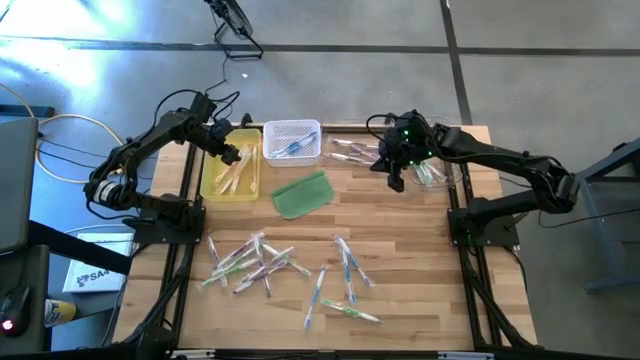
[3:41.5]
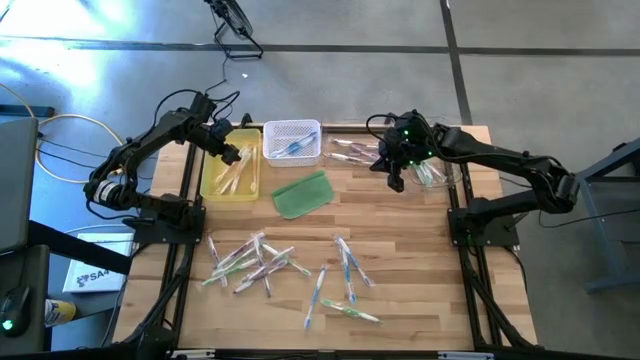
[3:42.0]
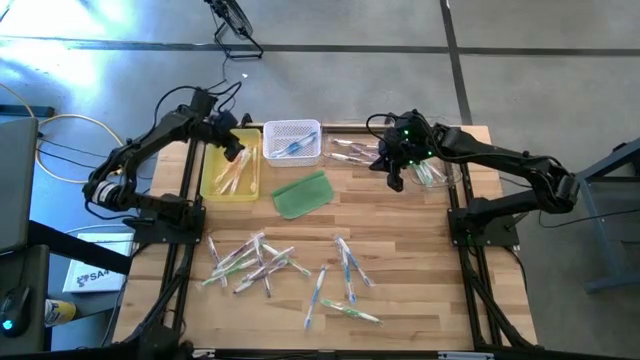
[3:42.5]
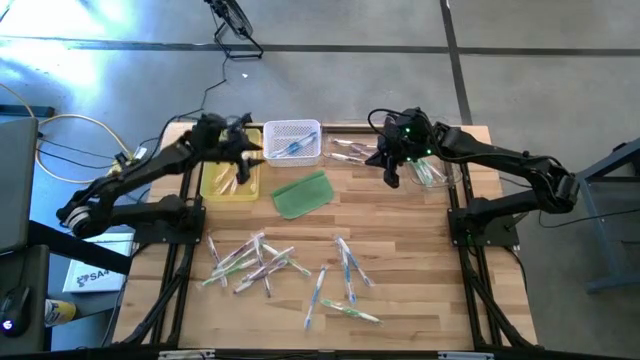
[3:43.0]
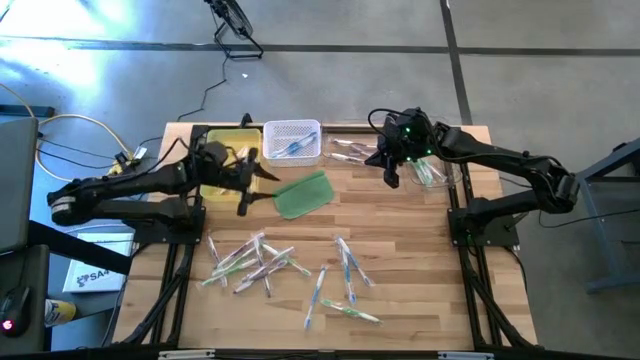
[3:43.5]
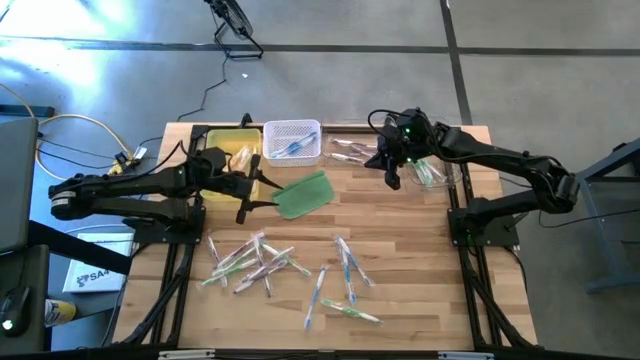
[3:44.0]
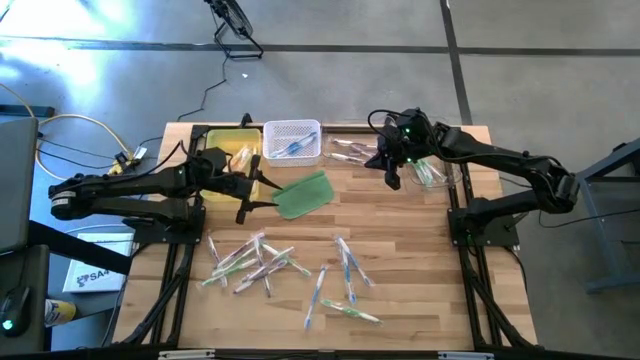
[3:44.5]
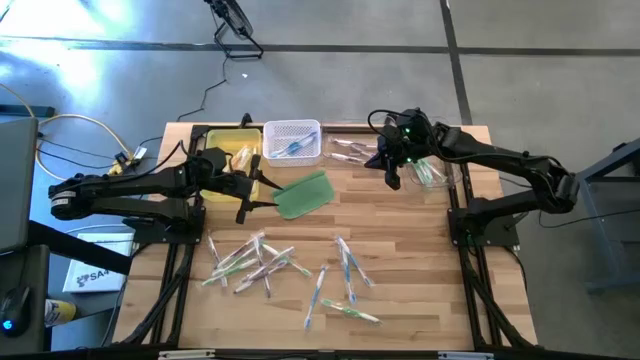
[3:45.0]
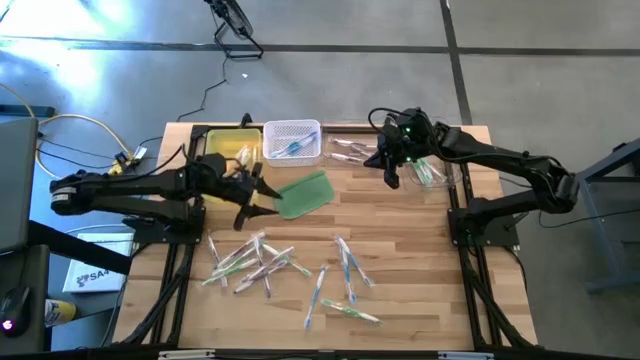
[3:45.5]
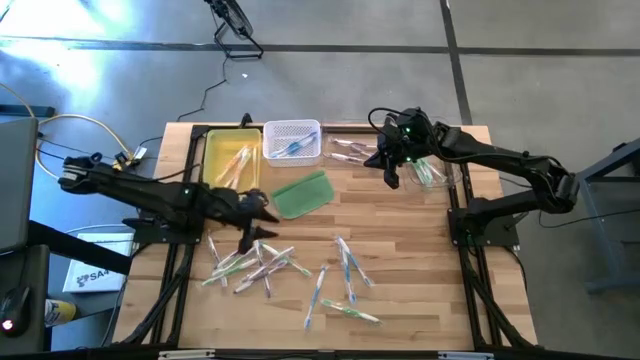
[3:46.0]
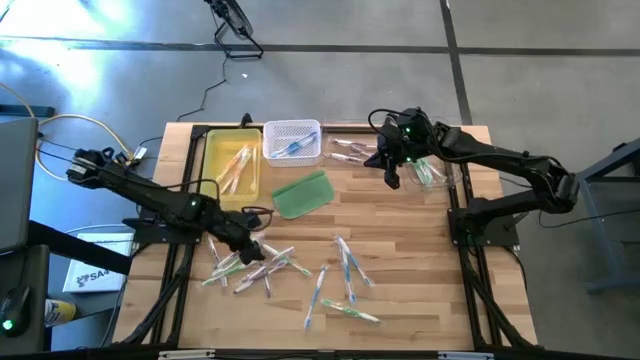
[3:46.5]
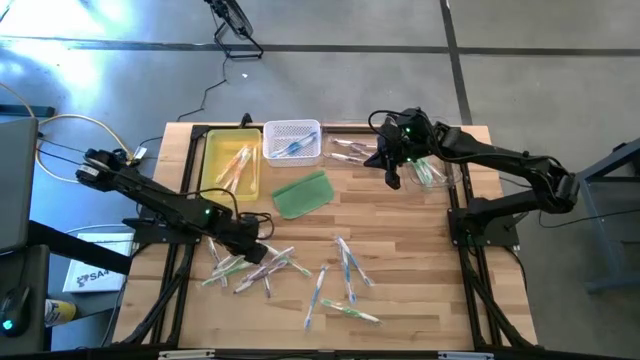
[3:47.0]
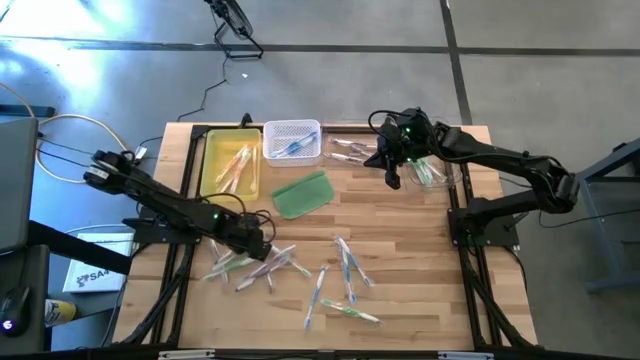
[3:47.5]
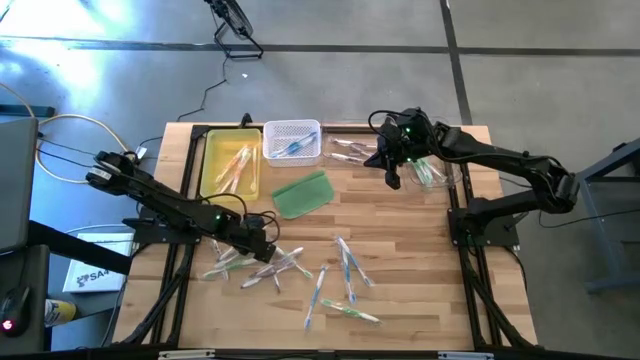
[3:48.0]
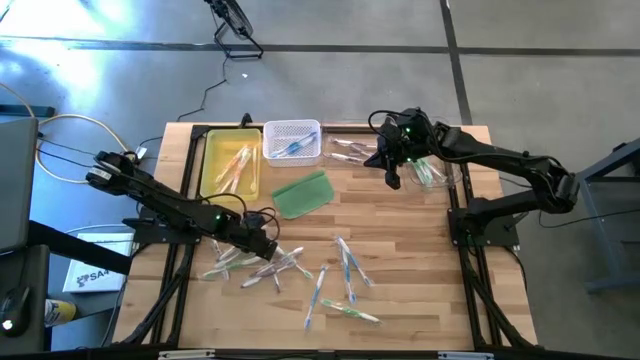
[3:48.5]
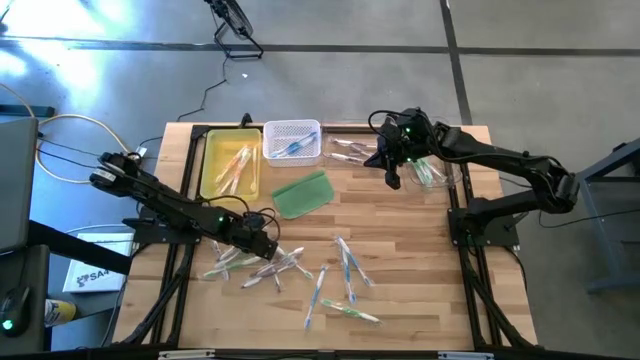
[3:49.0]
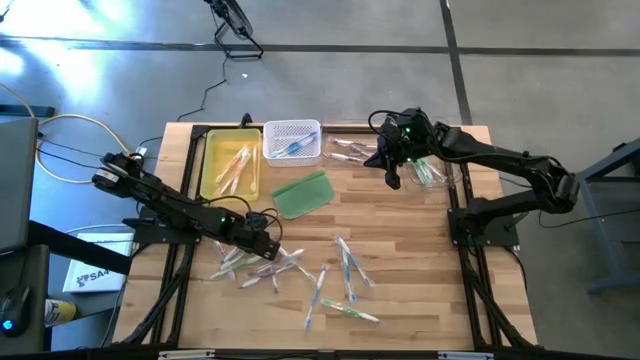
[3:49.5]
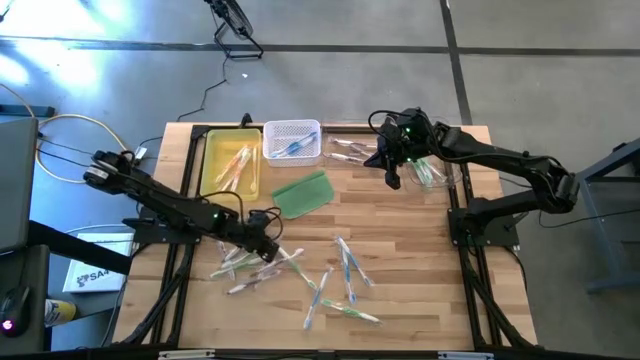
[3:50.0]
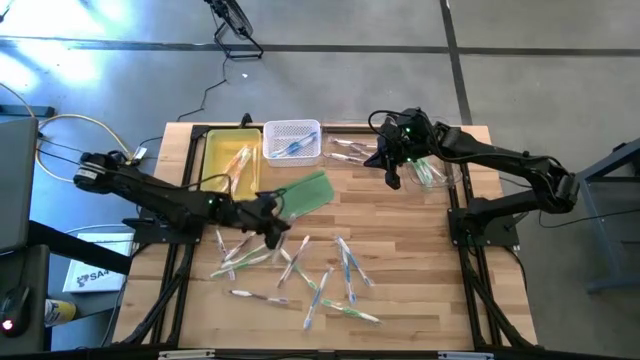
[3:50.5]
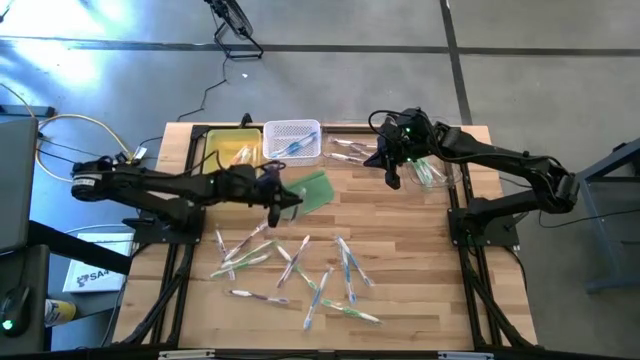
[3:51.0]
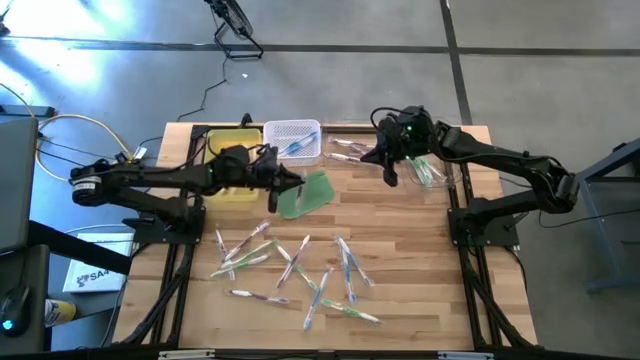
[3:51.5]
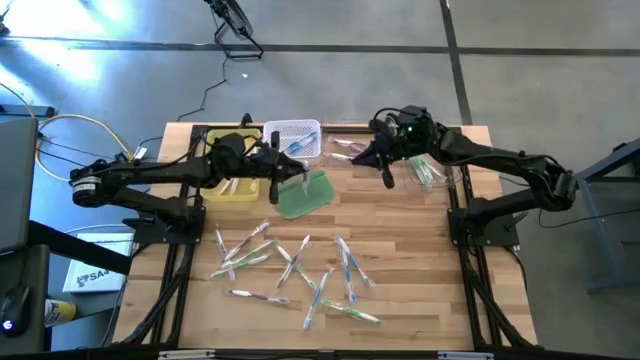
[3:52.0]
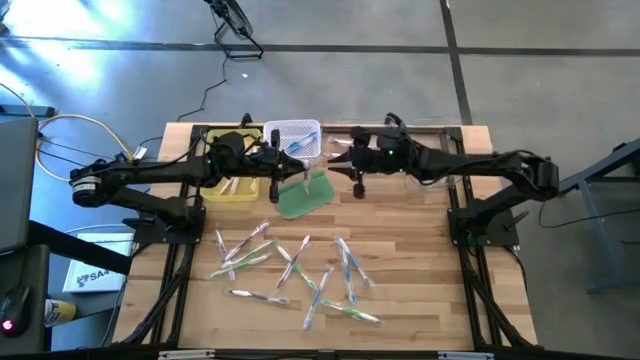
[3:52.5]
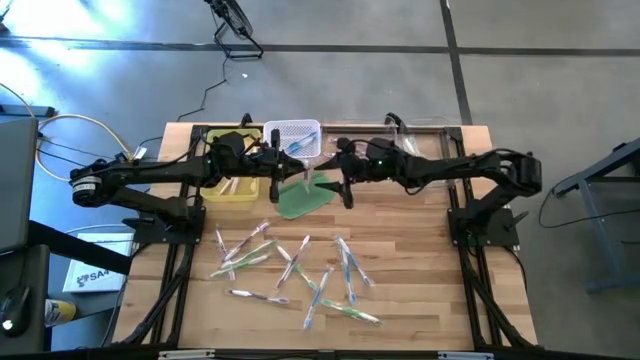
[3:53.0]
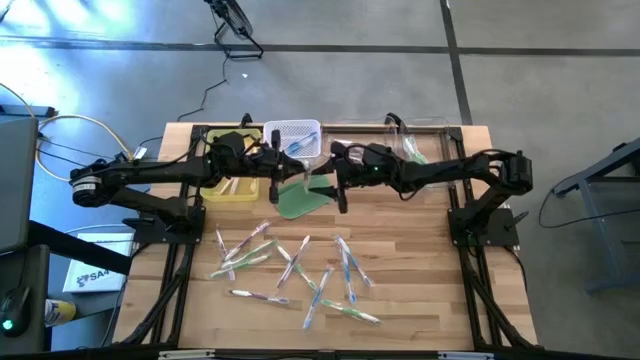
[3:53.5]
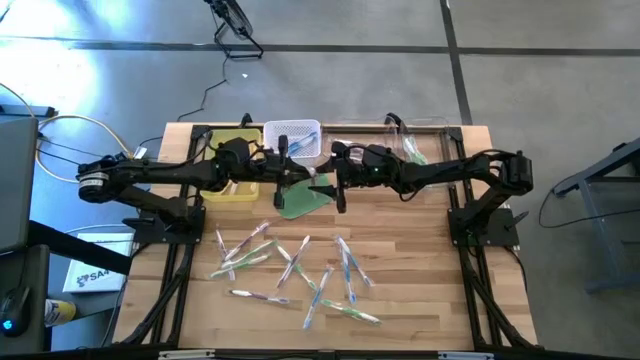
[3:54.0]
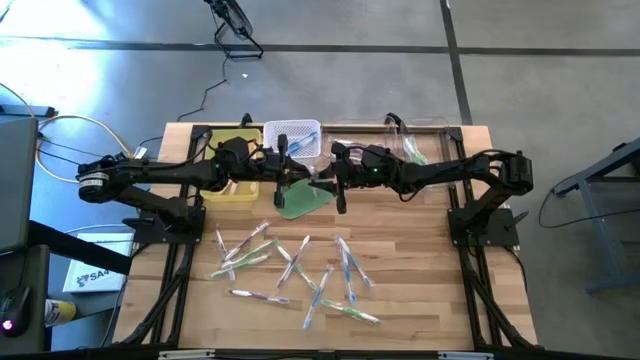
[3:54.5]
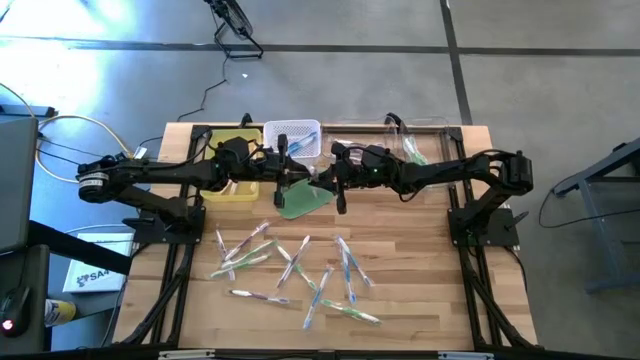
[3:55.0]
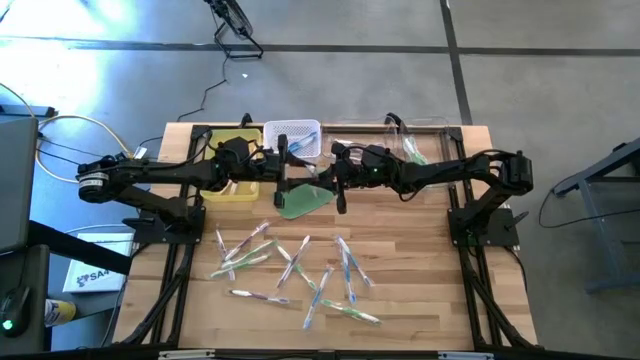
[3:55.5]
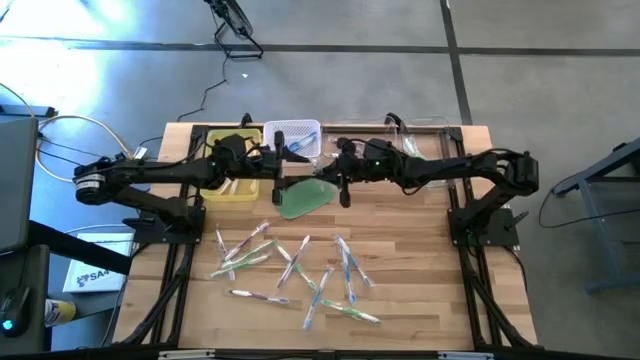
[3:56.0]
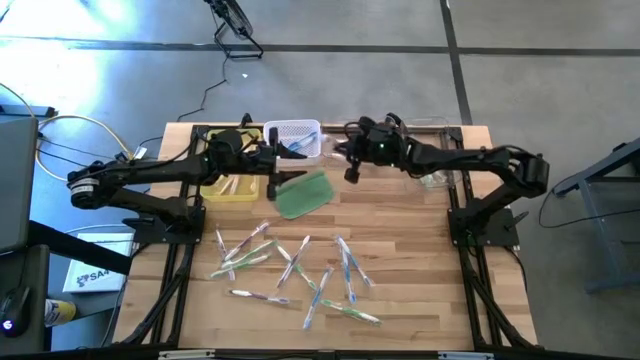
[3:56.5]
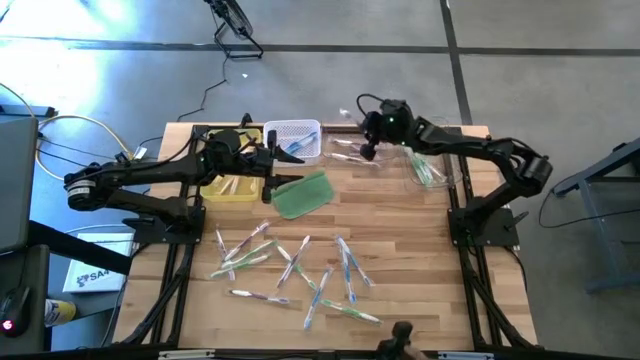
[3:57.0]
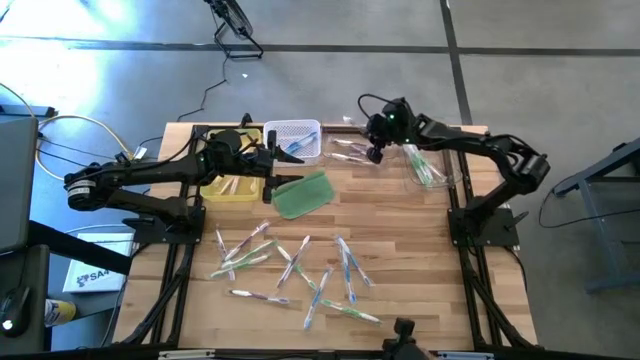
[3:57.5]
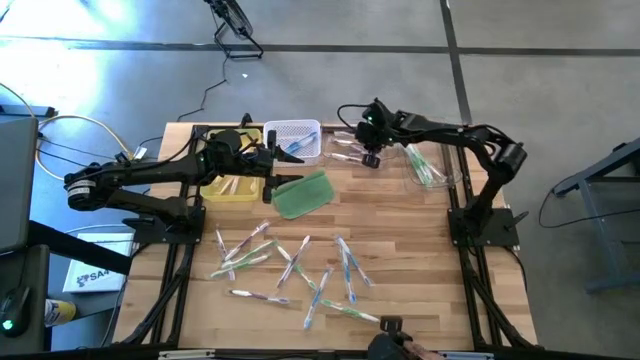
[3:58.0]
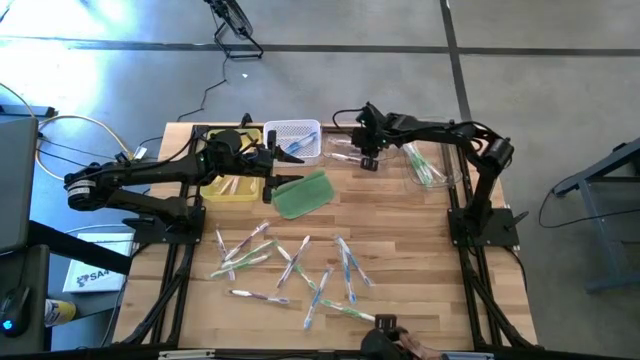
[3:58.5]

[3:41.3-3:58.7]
Task: Pick & Place Toothbrushes
Put the violet toothbrush into the left transparent bin

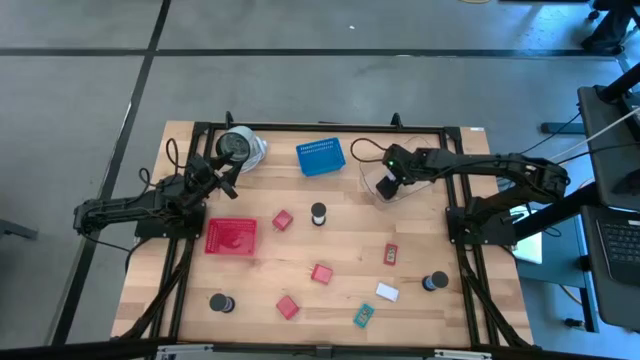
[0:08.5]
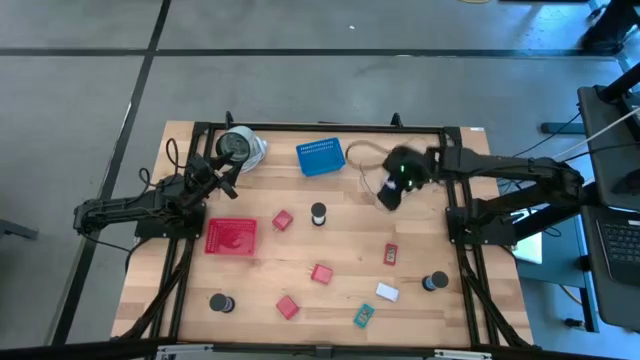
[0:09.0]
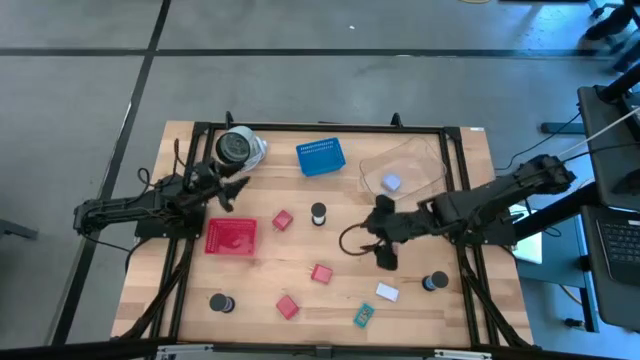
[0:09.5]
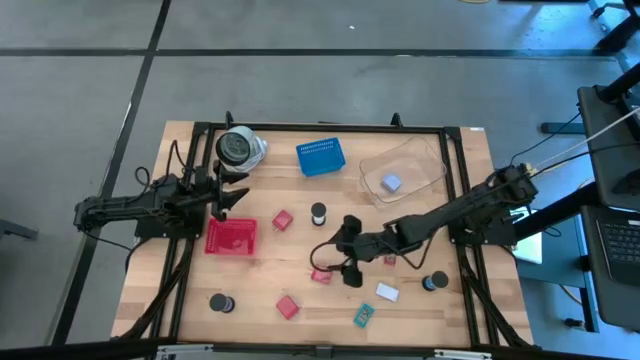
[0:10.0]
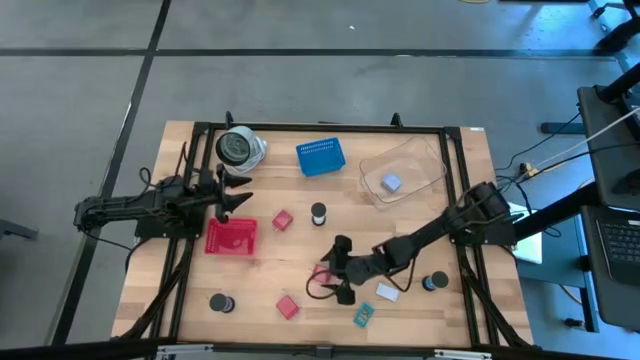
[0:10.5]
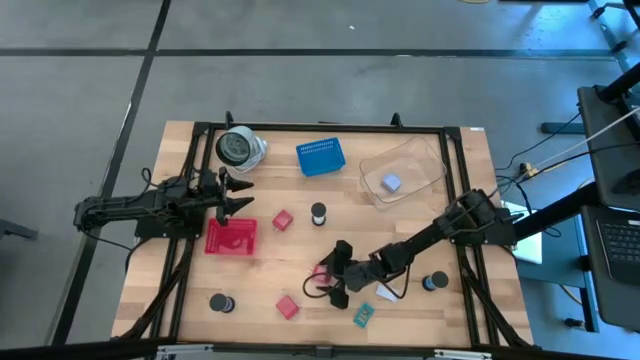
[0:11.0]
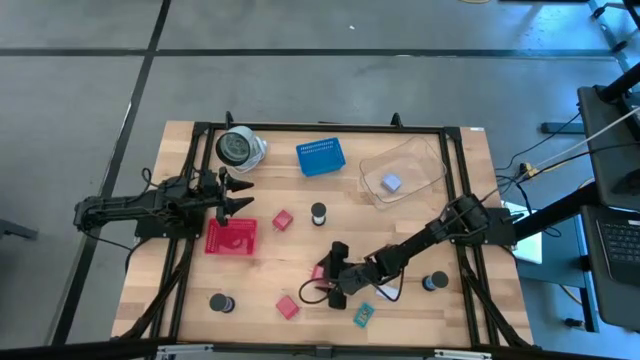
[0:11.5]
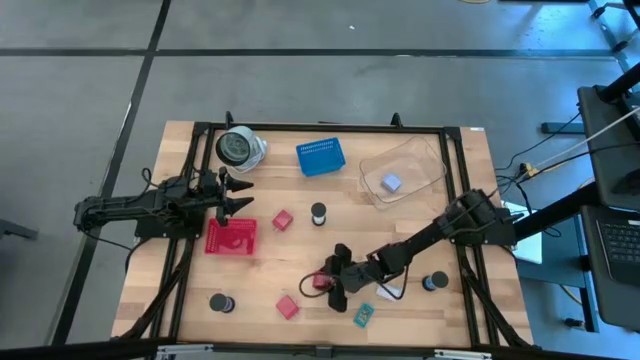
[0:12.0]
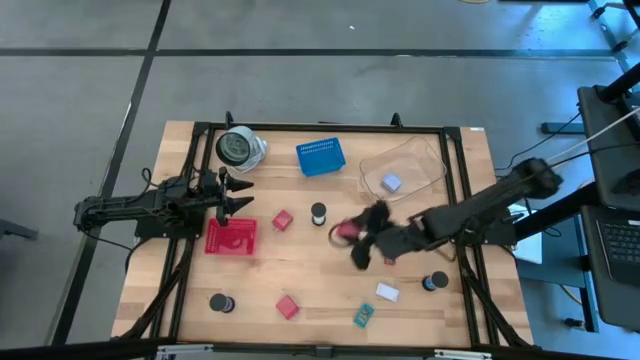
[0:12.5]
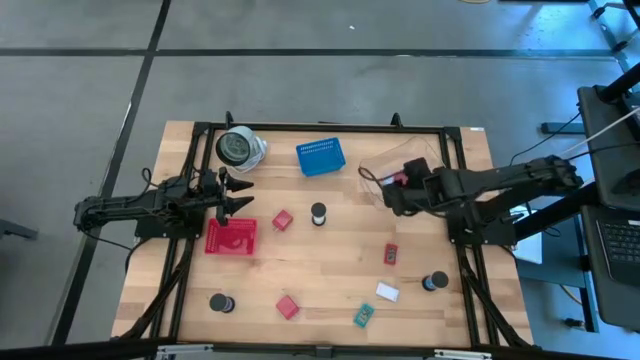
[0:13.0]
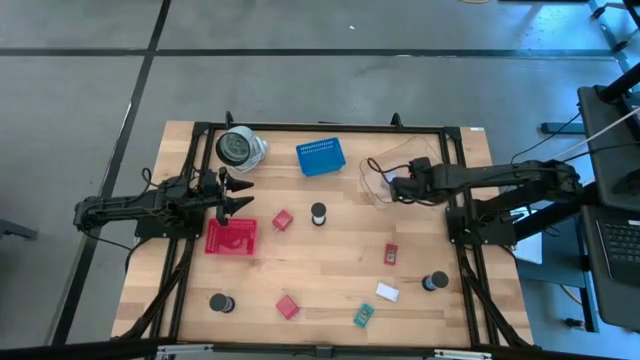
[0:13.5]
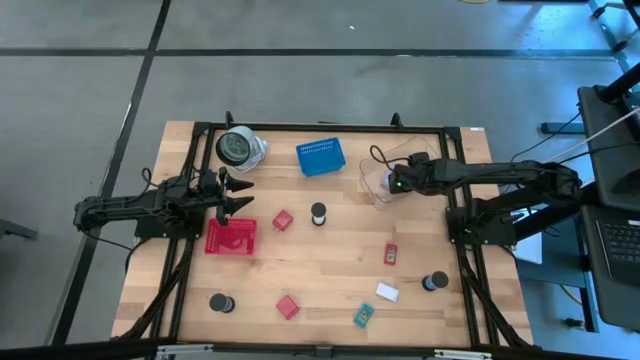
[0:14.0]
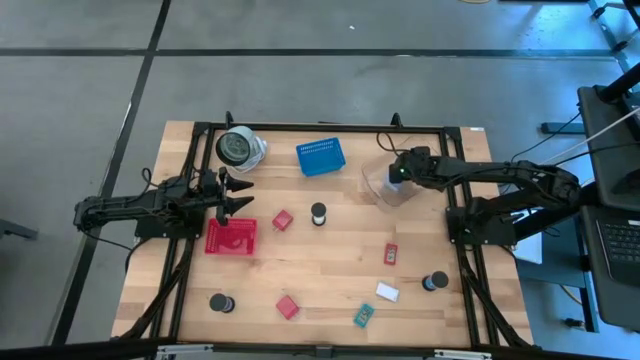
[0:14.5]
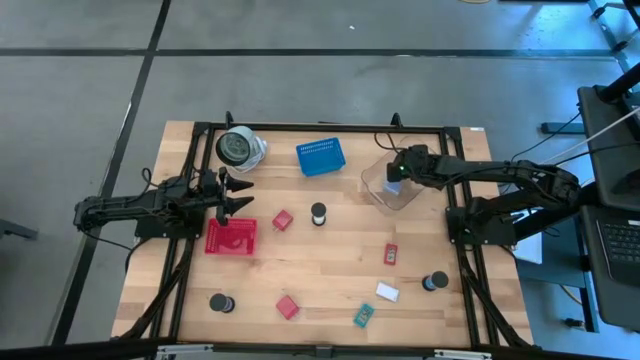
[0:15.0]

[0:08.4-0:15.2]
Task: Pick & Place Office items
Put the middle red charger adapter into the transparent bin
